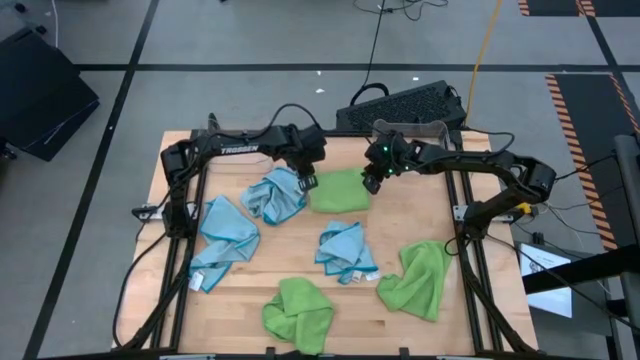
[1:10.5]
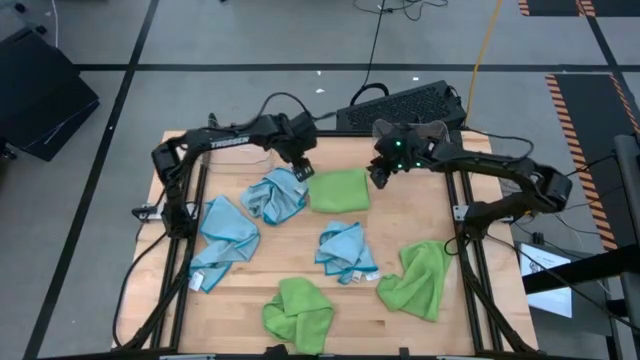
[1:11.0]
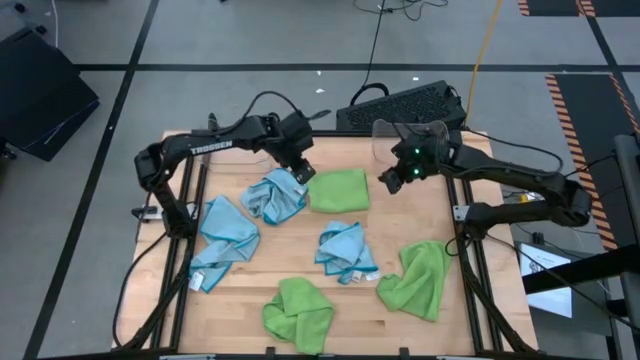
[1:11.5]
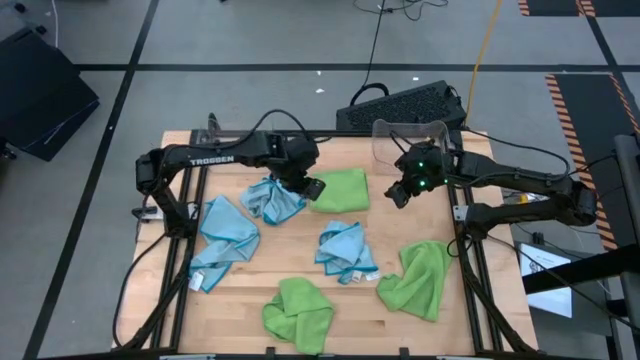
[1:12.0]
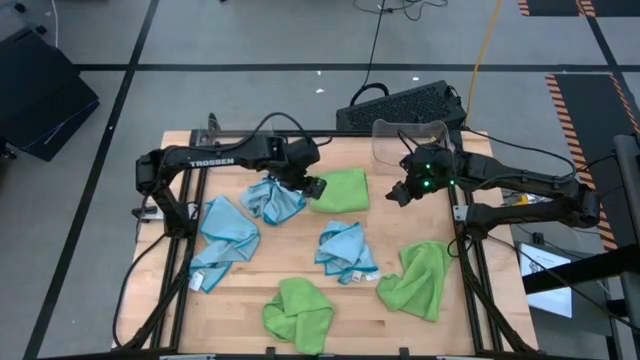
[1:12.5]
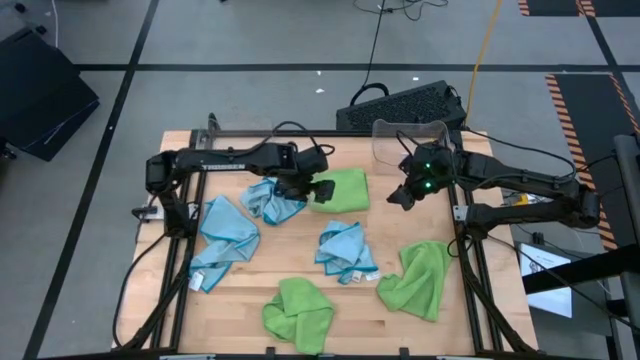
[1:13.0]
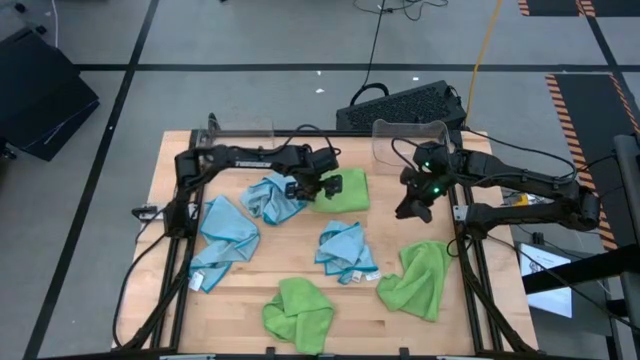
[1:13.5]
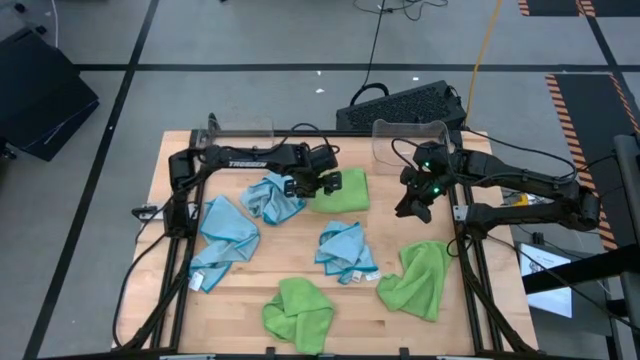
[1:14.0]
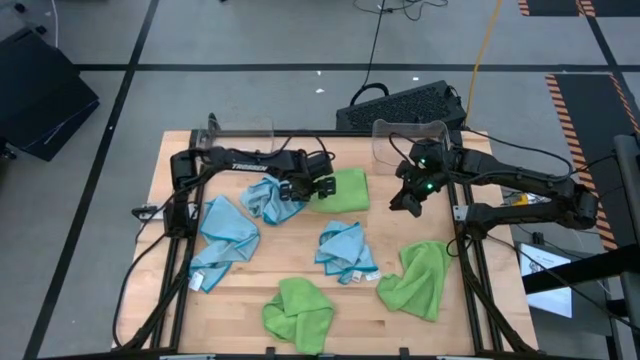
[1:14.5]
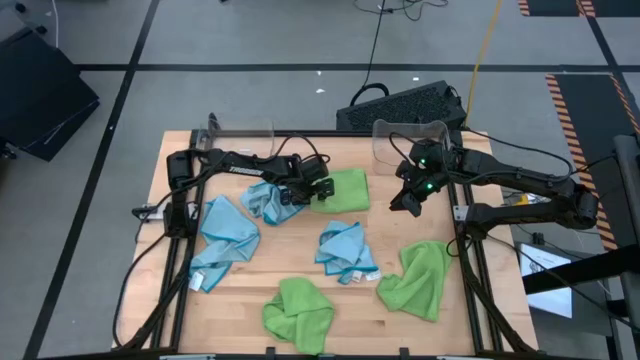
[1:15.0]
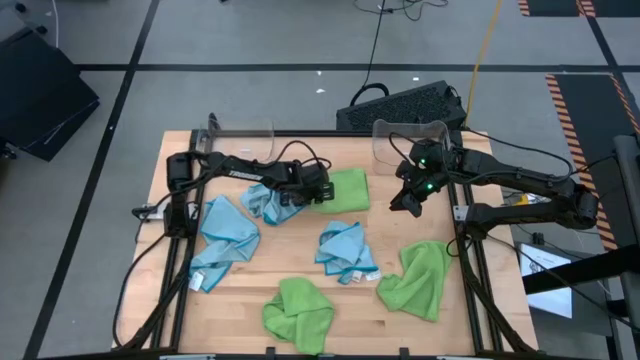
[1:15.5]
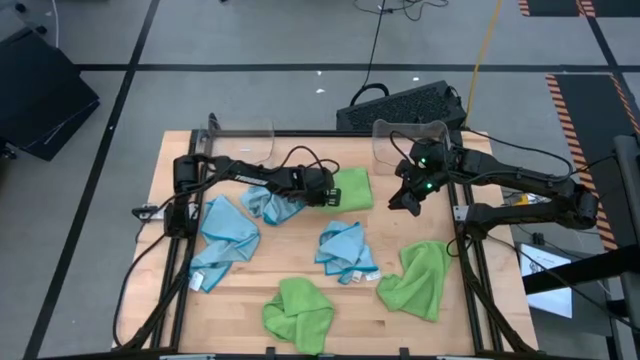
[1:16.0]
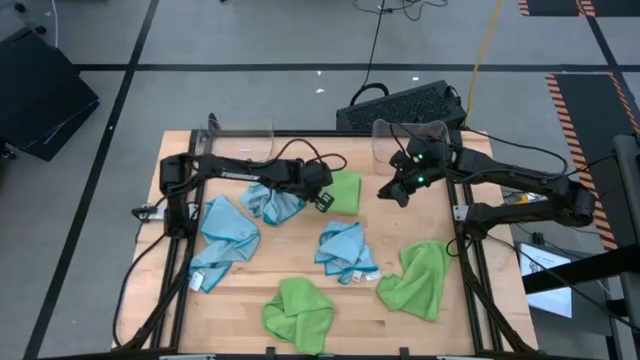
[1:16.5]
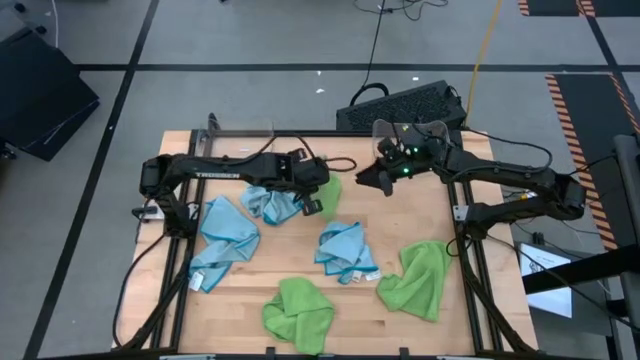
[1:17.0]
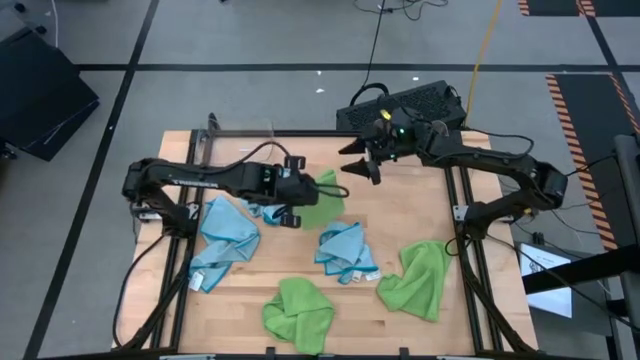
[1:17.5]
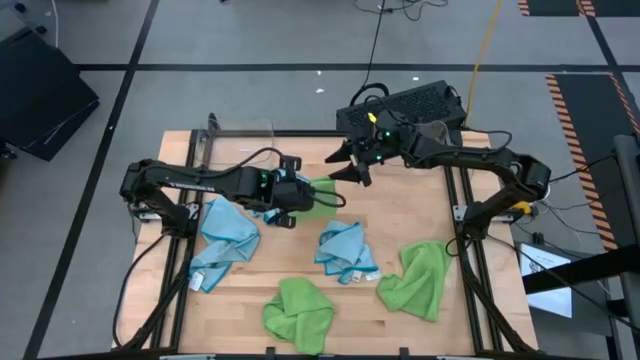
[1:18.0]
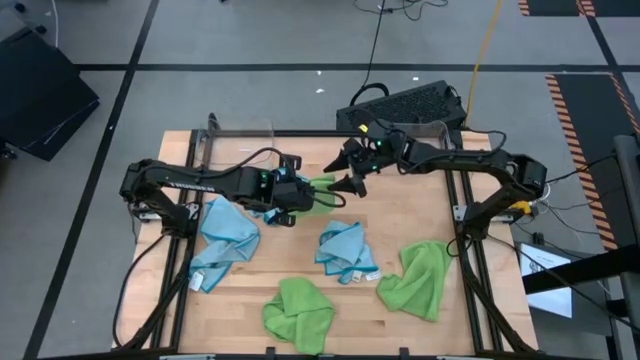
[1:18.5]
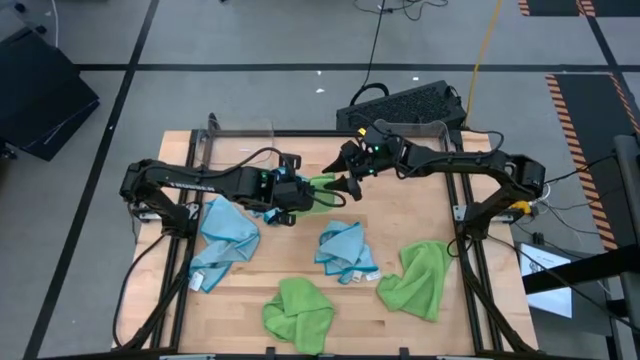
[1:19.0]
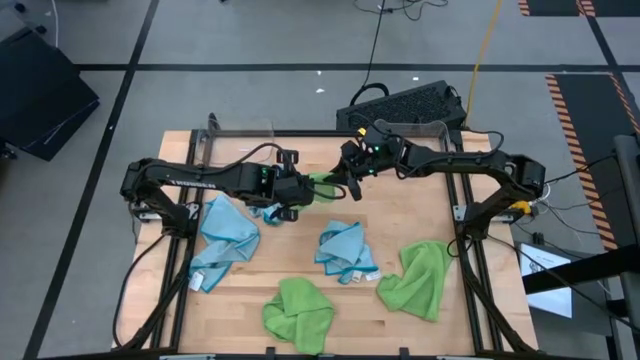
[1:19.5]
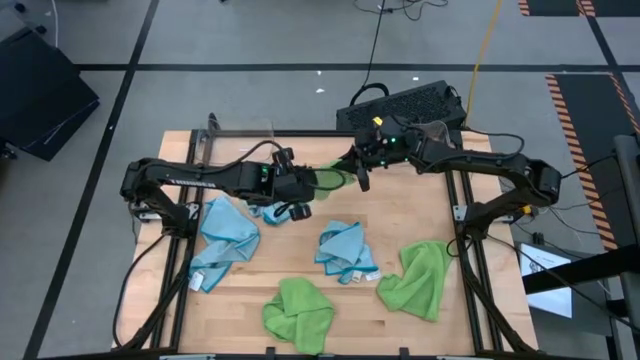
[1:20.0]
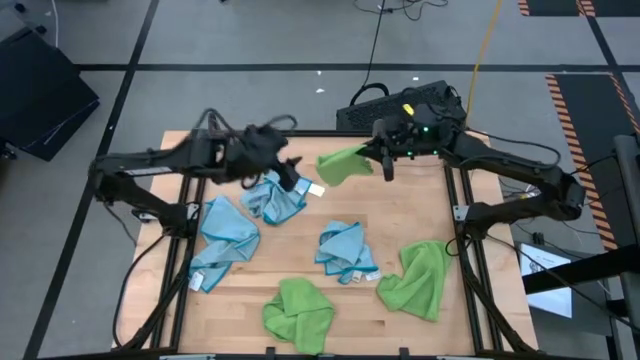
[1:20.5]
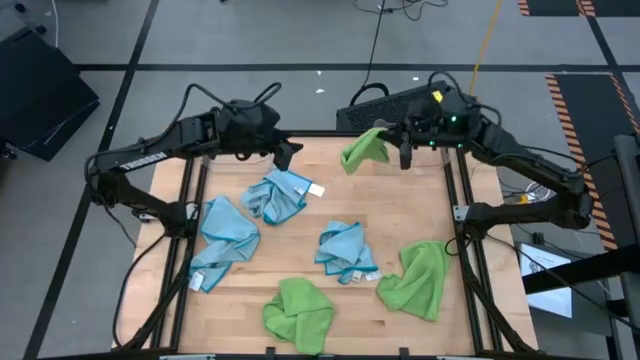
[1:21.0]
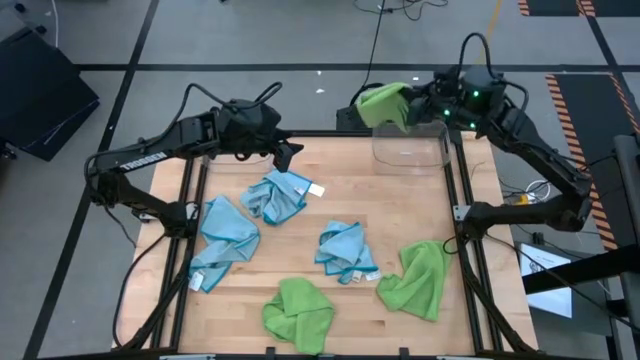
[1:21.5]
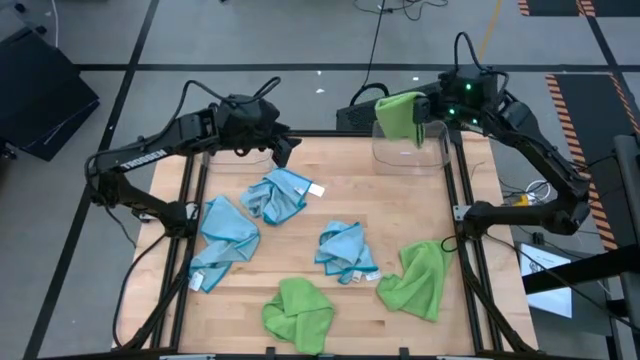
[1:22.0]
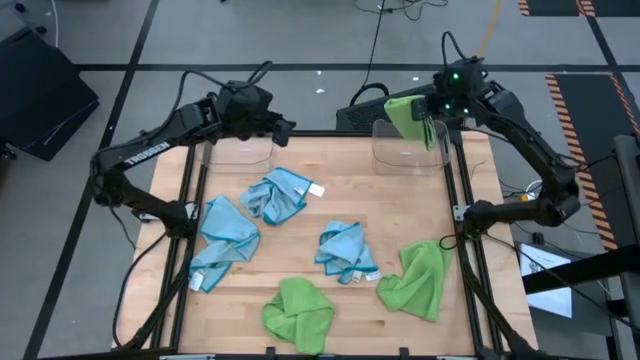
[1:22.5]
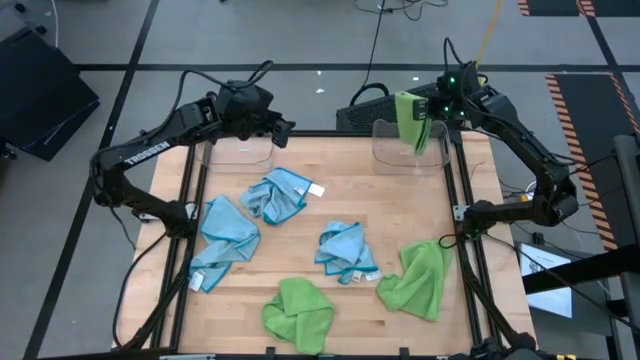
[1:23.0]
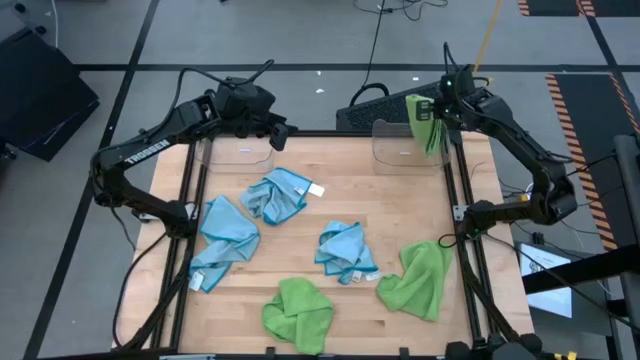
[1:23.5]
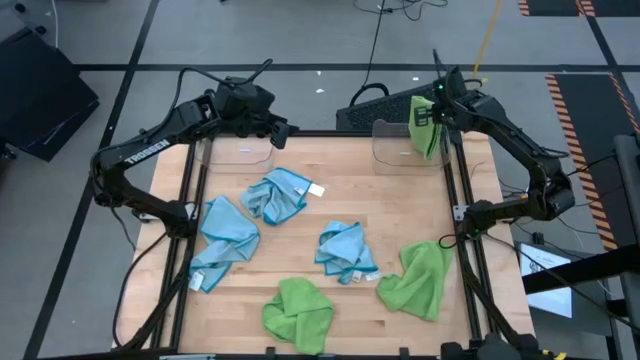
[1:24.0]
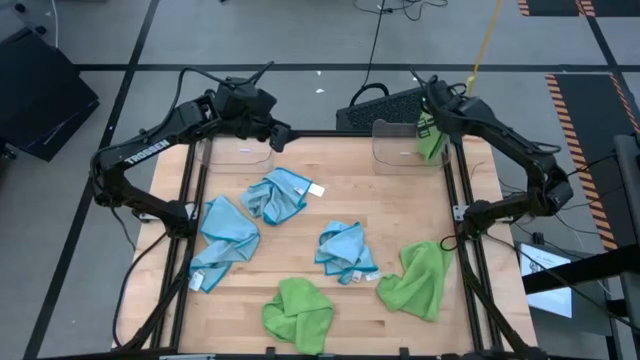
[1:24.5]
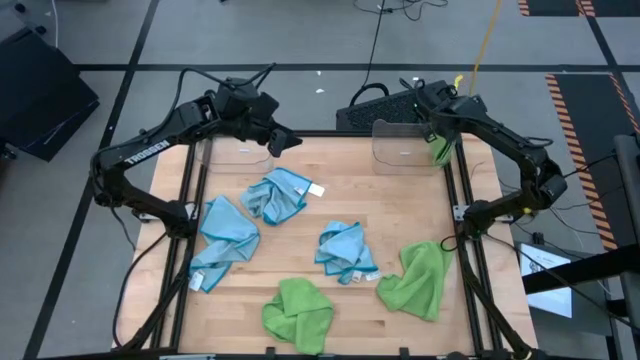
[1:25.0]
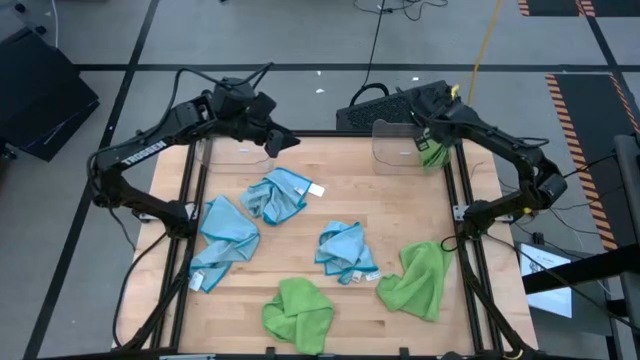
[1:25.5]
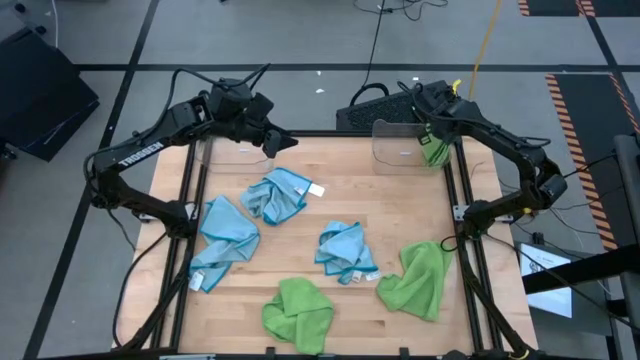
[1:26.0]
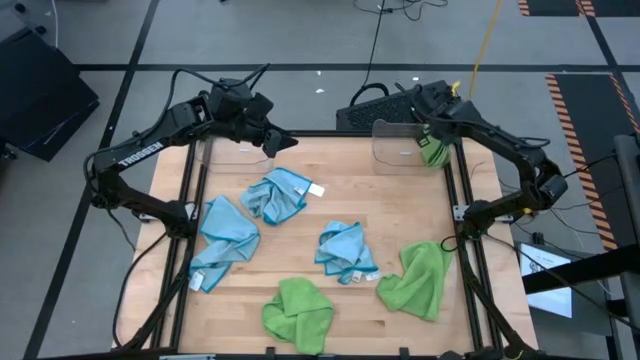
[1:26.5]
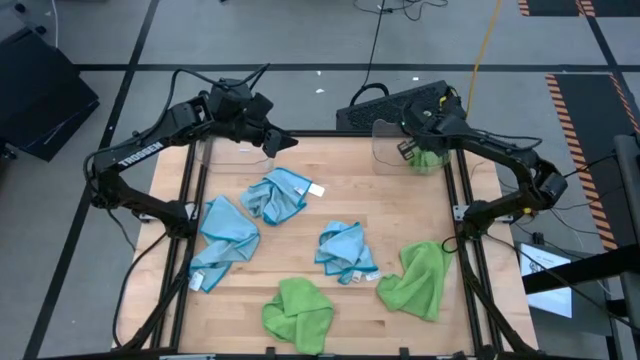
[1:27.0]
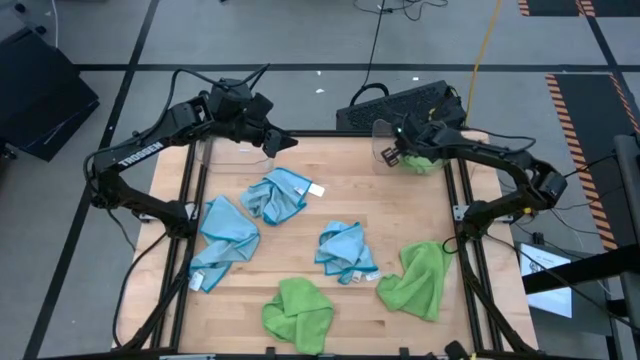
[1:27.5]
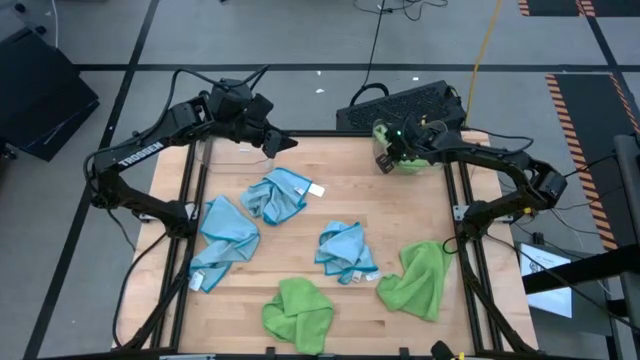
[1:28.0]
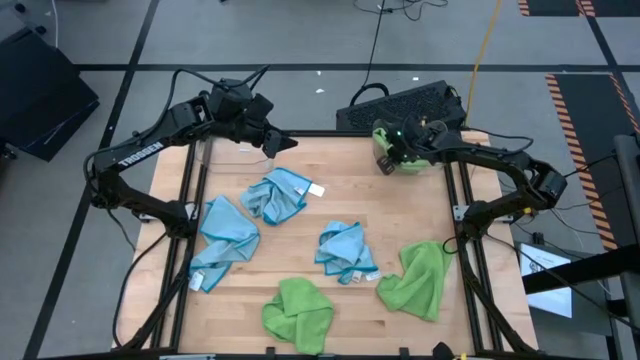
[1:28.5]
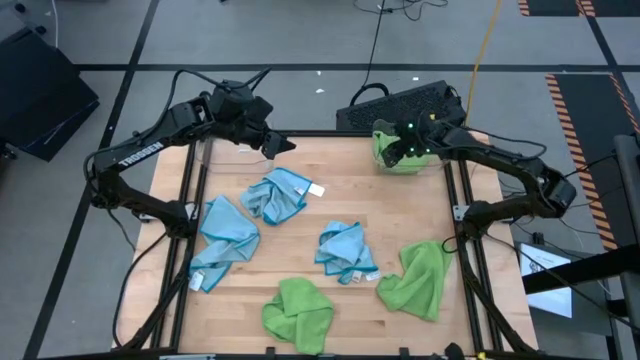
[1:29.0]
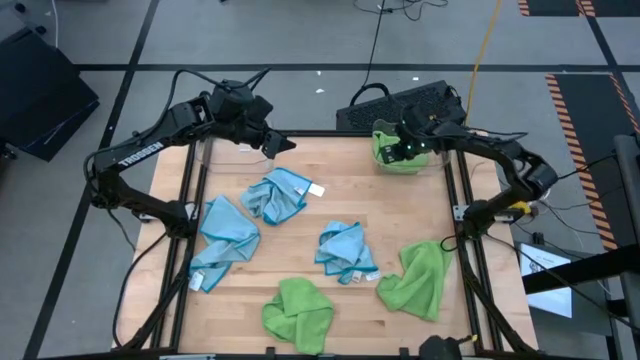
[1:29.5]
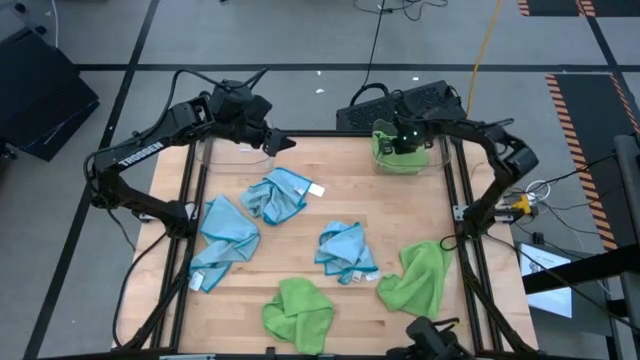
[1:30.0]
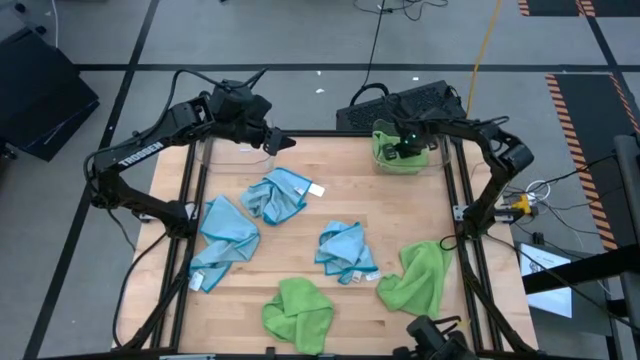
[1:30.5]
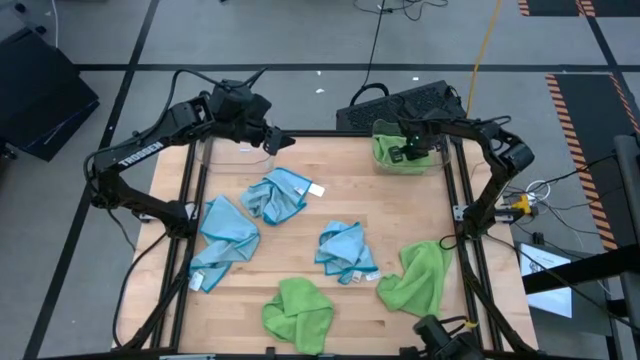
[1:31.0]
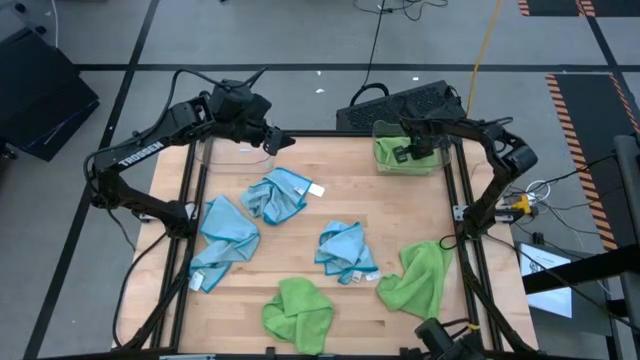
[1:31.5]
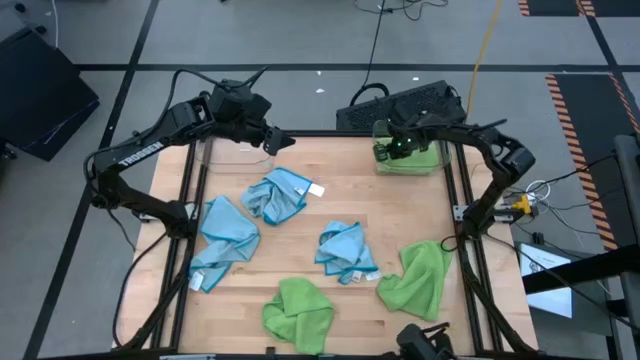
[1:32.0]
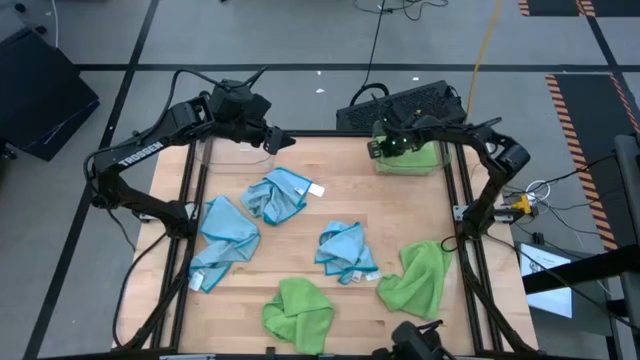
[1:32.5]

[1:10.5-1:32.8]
Task: Sort microfiber towel by color & place in baskets
Put the top green towel into the right transparent bin
